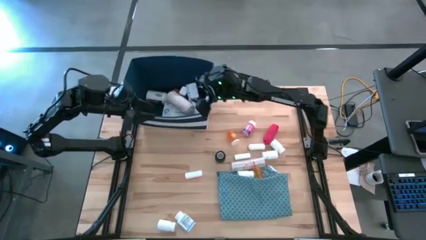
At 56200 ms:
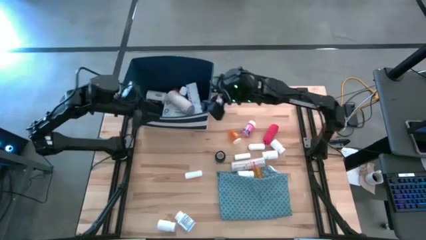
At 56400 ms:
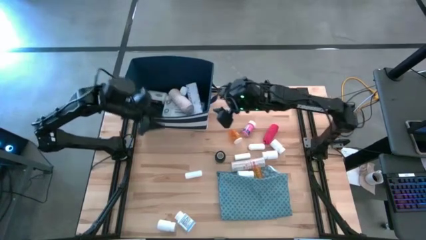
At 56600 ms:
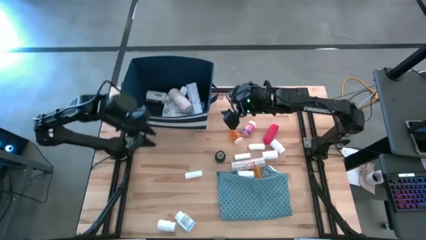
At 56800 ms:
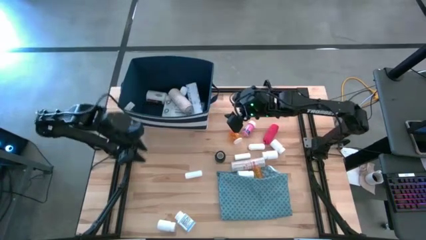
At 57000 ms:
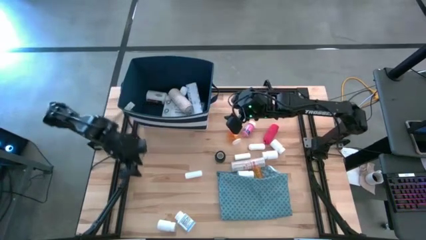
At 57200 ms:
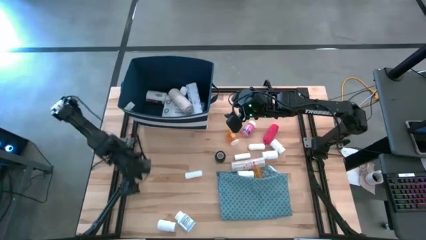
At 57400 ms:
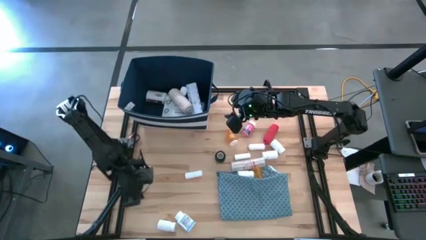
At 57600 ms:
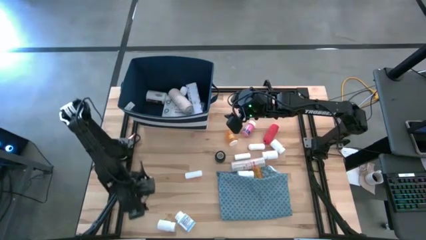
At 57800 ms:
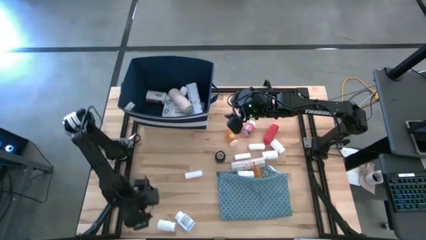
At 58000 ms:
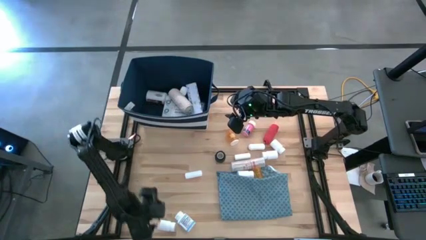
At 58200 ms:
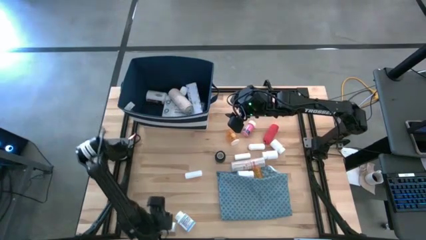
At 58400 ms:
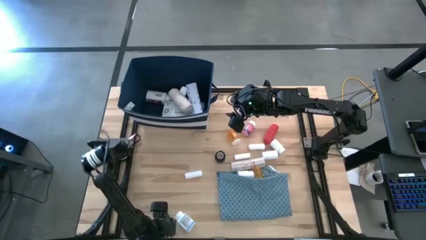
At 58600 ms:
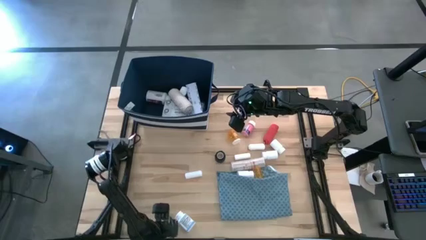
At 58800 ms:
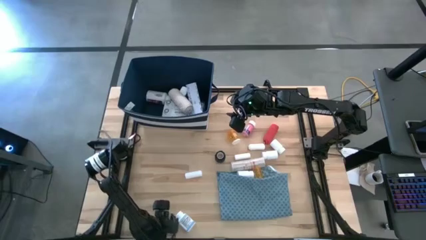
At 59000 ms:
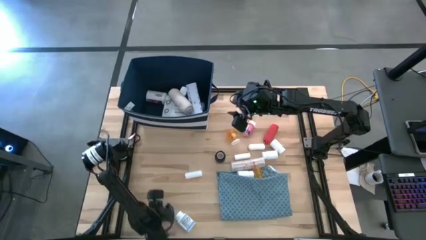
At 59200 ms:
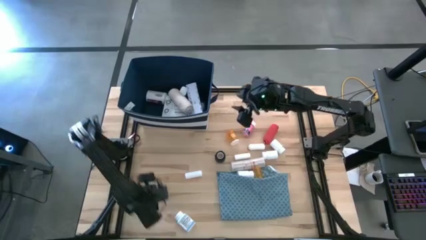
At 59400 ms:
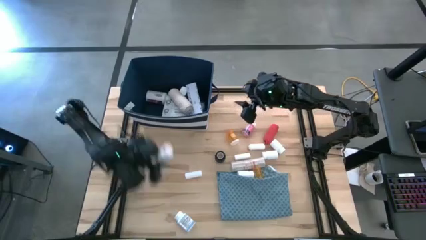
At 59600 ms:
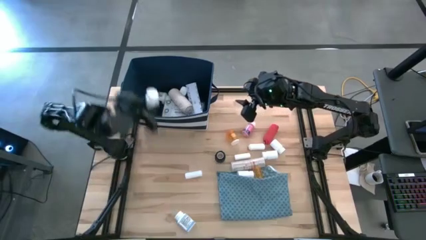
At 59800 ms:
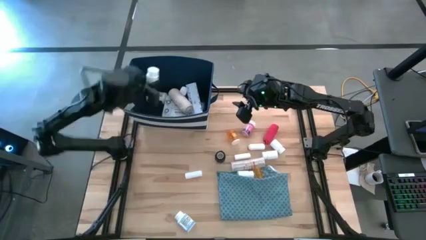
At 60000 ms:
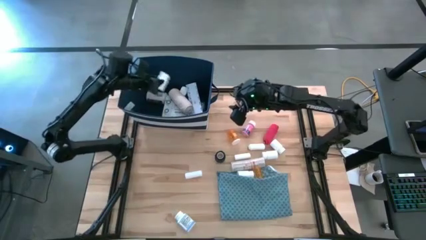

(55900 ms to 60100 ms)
Task: Pick & place medical supplies in basket/bin
Put the white medicine bottle into the blue bin

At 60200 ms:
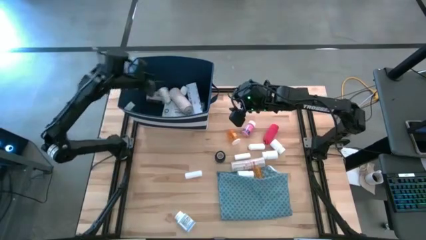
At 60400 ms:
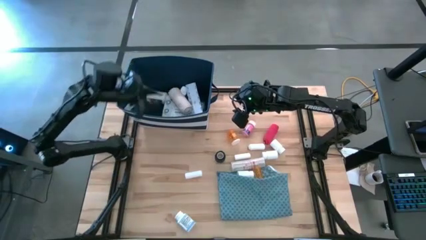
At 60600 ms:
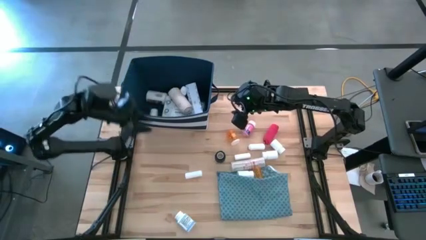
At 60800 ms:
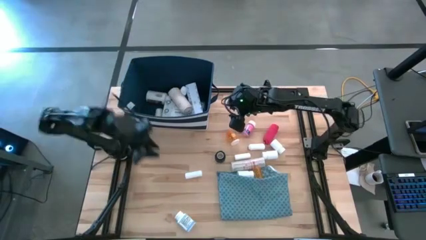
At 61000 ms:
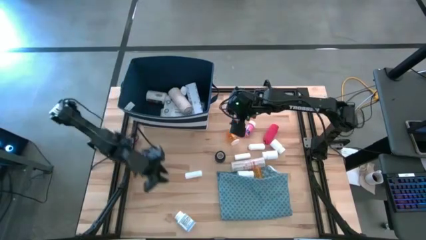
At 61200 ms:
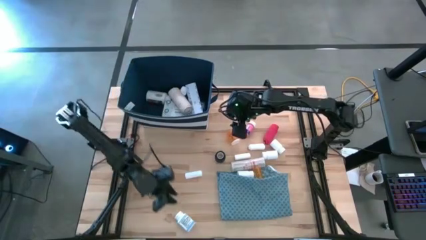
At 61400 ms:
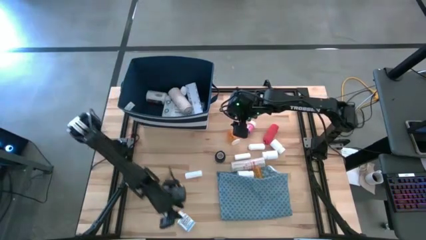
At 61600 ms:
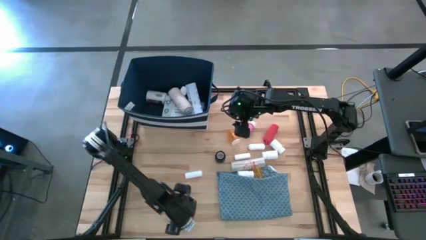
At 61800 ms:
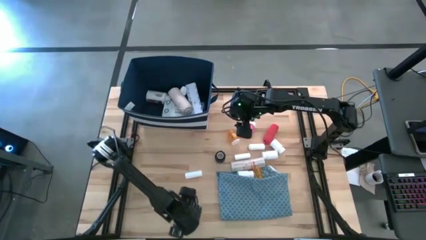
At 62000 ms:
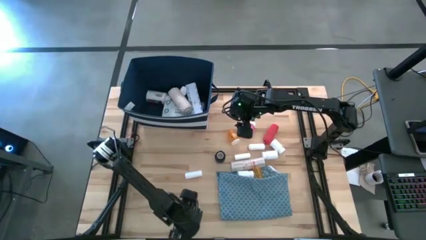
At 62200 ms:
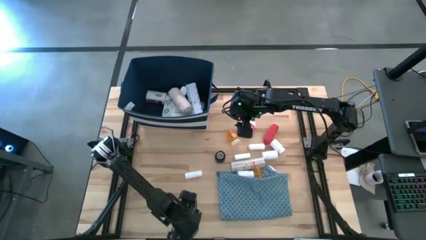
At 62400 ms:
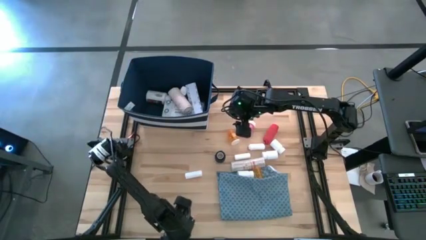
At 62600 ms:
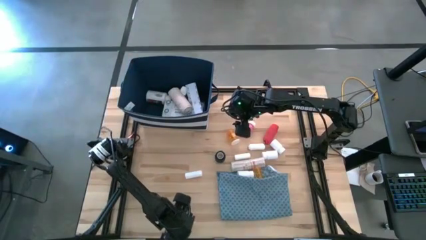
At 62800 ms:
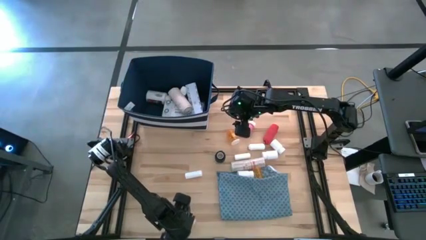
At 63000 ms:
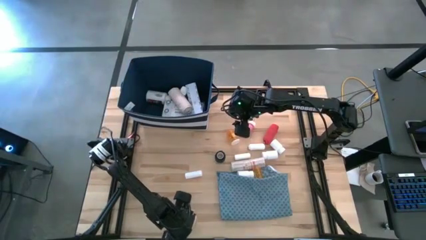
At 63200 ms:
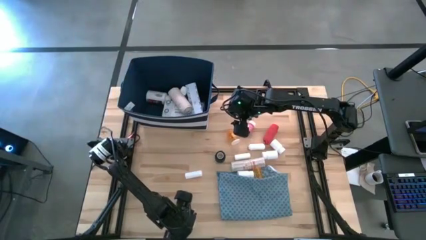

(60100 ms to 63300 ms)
Put the blue medicine bottle into the blue bin

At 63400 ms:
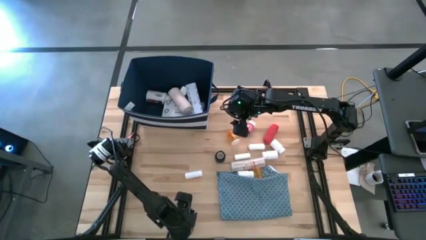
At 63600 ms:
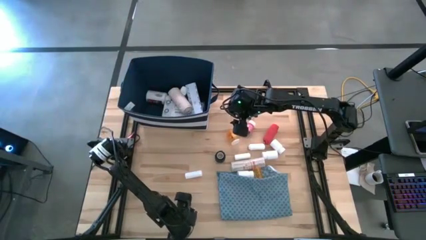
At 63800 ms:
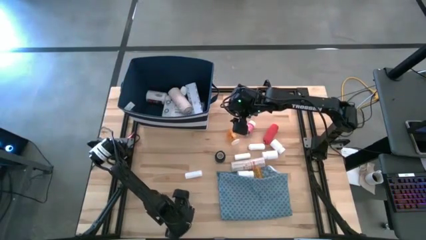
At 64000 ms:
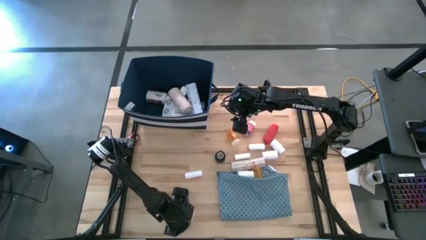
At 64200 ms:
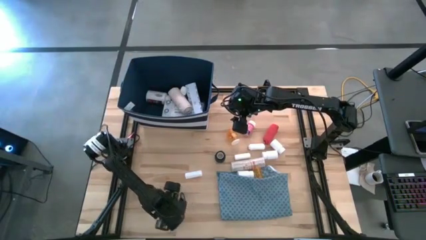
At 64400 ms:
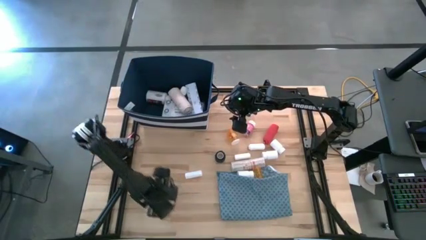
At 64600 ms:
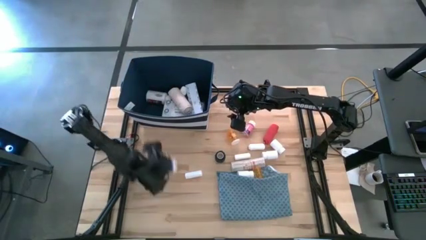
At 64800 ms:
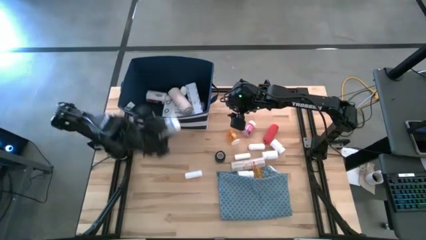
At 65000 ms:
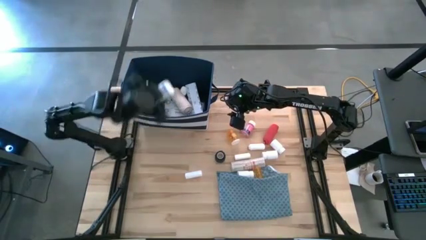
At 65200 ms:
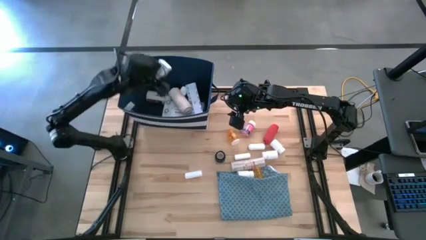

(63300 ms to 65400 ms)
Put the blue medicine bottle into the blue bin

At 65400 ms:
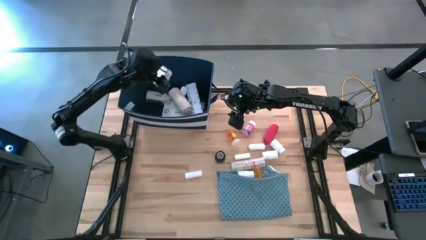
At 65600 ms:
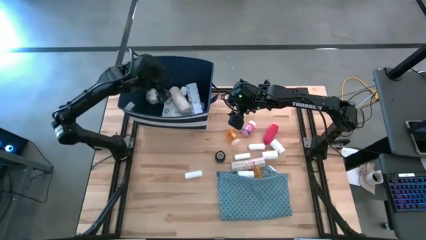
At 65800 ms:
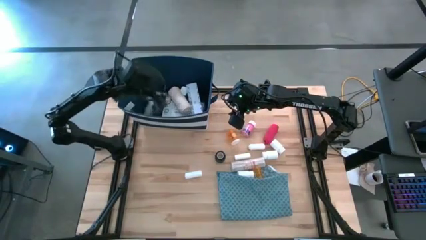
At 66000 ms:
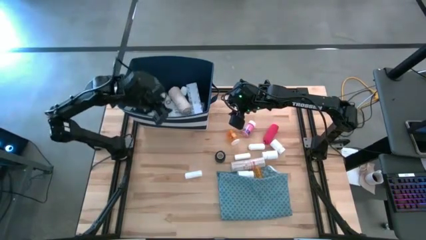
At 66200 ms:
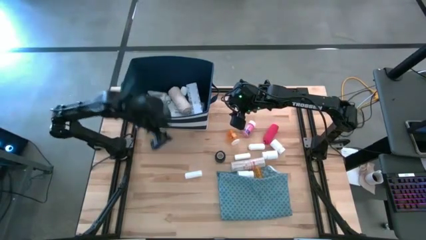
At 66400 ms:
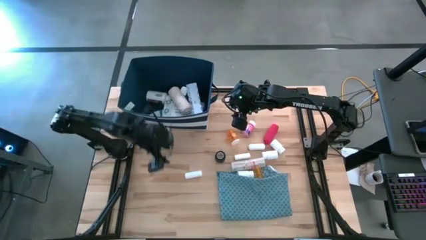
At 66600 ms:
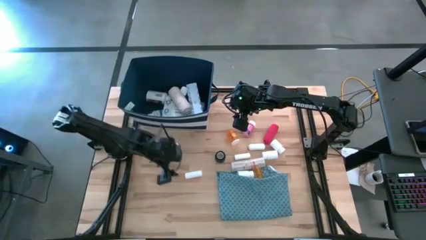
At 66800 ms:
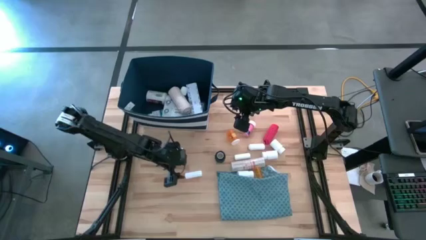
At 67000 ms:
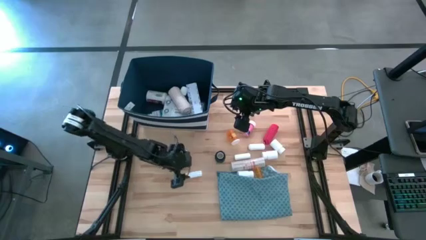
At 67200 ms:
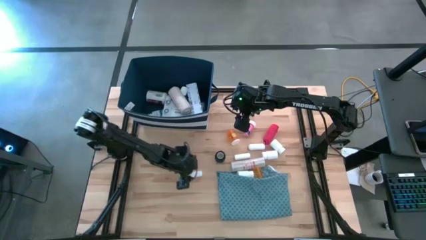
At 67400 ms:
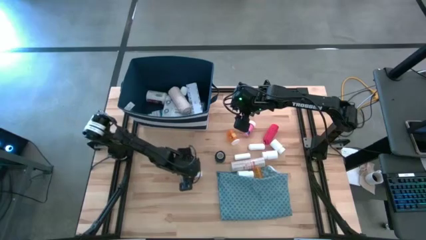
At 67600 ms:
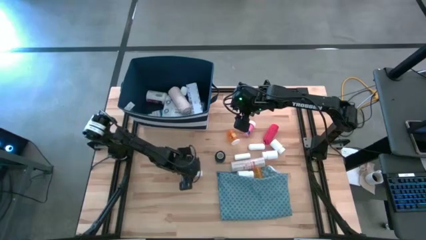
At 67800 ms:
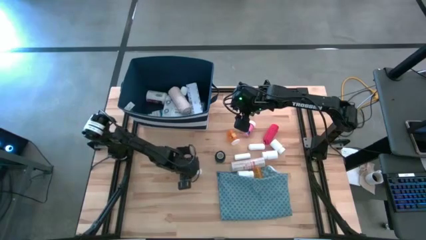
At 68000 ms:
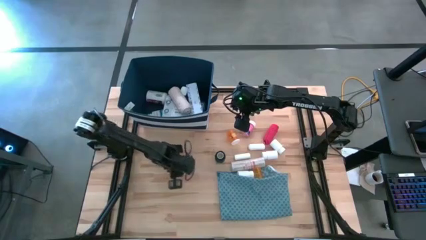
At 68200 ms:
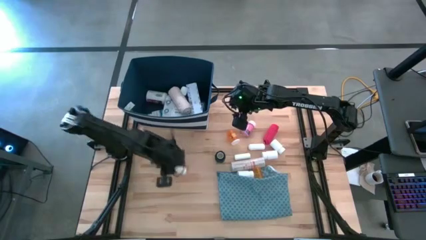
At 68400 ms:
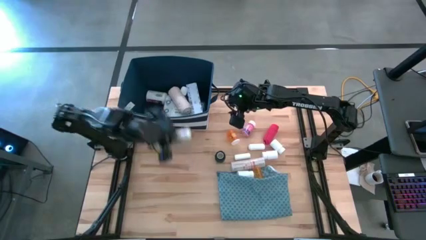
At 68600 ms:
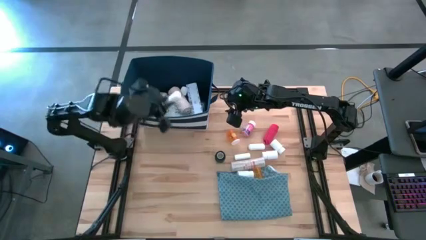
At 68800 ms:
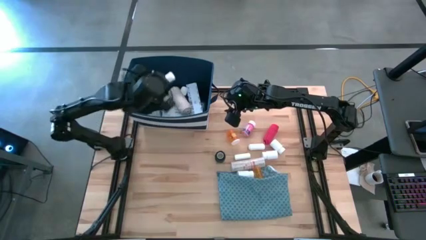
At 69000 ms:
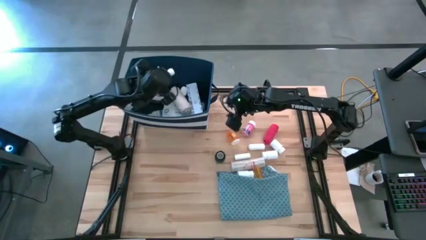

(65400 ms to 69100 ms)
Put the white rolled gauze into the blue bin

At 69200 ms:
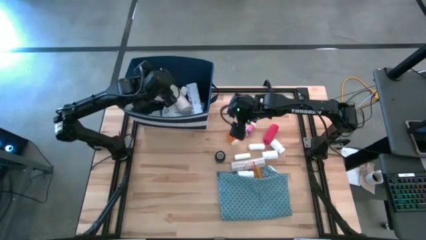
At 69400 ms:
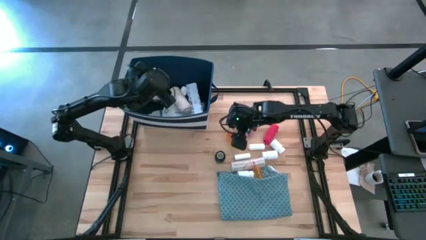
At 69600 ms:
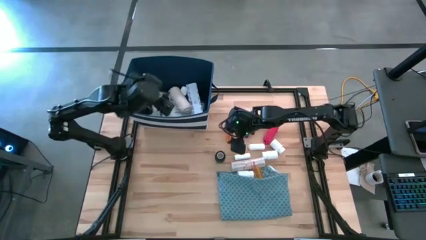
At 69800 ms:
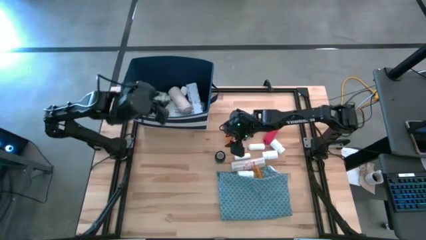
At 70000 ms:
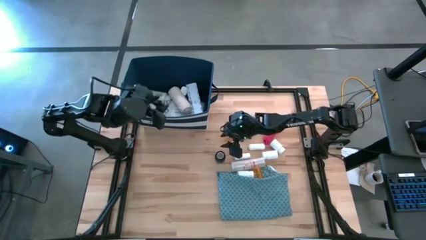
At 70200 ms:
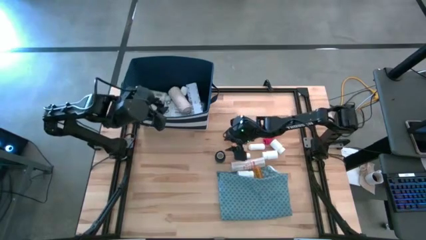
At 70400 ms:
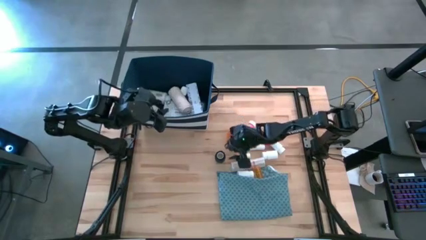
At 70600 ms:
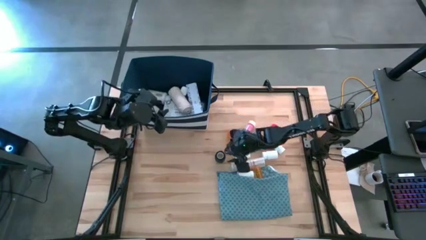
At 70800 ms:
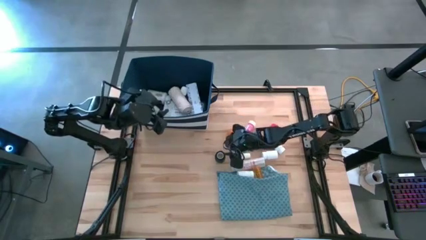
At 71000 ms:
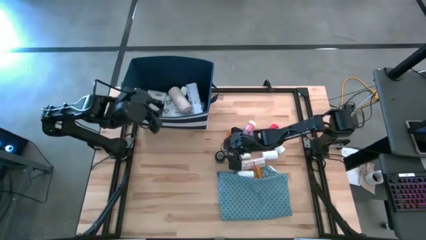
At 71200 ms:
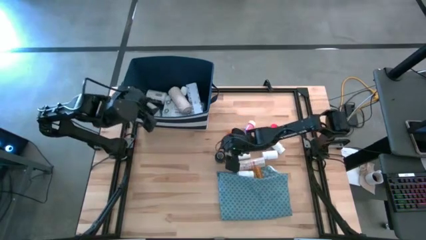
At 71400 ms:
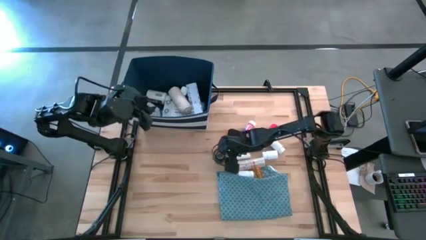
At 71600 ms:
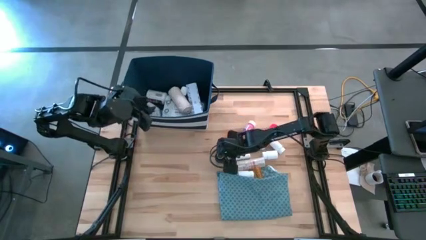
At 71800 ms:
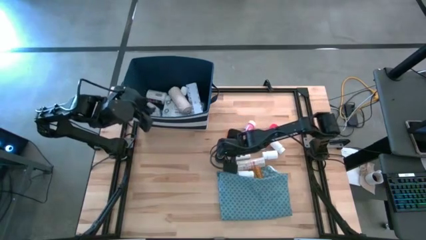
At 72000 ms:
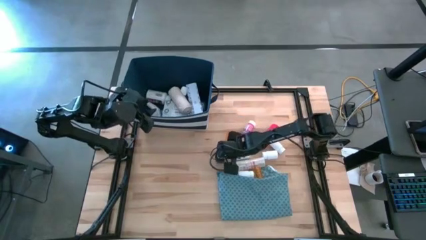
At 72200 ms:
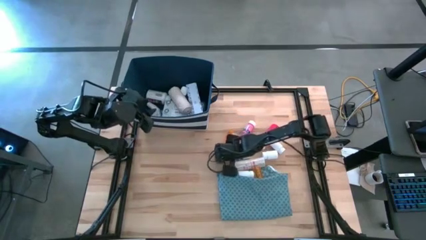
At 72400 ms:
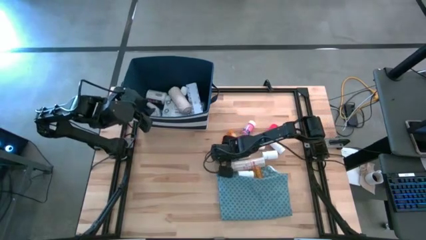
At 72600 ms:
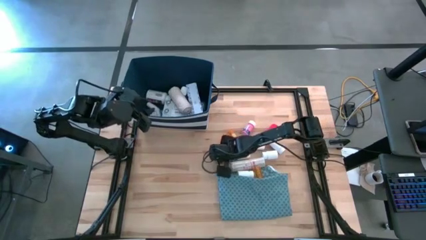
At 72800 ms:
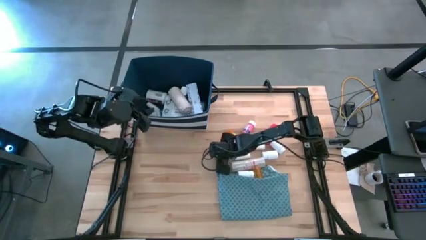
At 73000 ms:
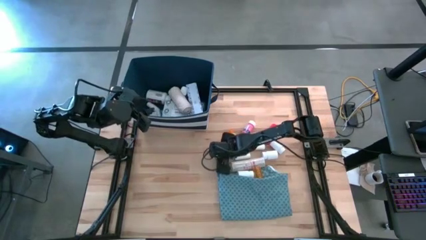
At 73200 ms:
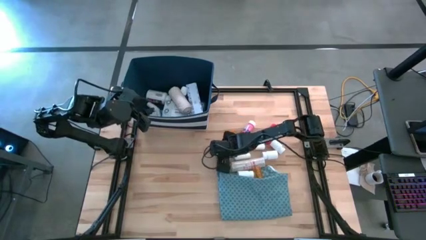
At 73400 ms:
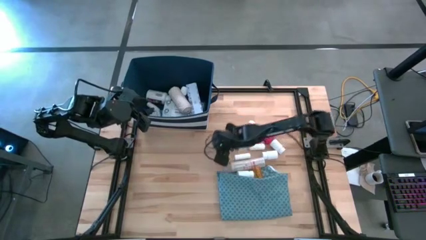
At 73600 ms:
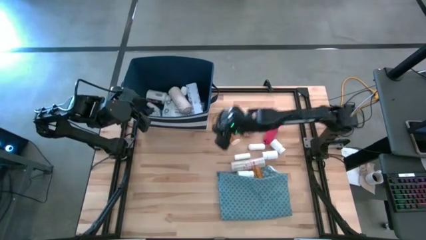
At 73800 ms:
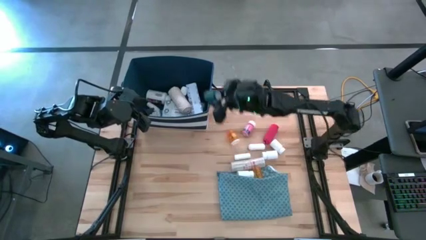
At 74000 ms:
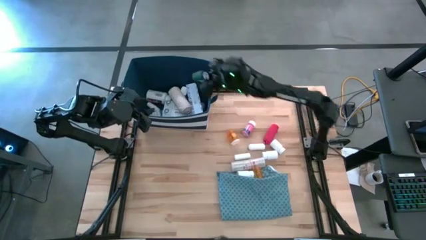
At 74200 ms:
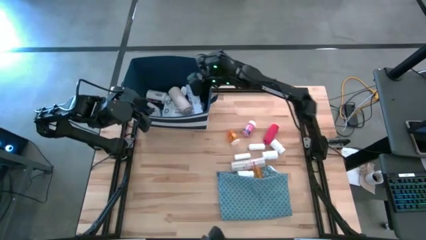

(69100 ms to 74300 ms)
Put the black bandage into the blue bin
